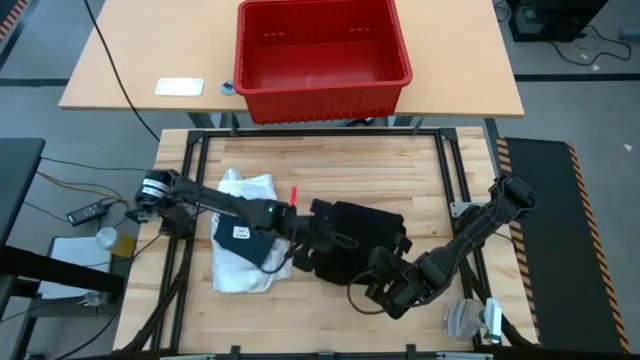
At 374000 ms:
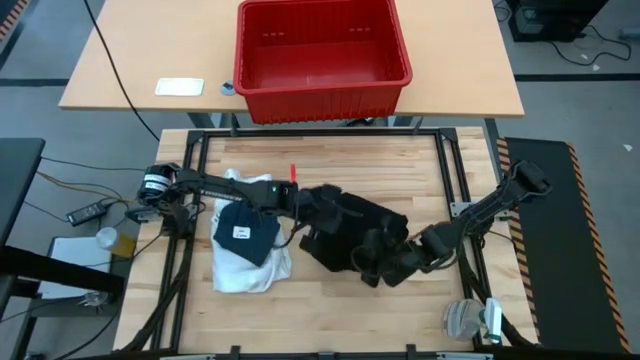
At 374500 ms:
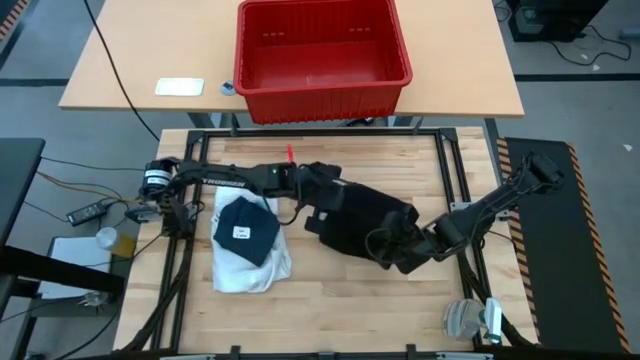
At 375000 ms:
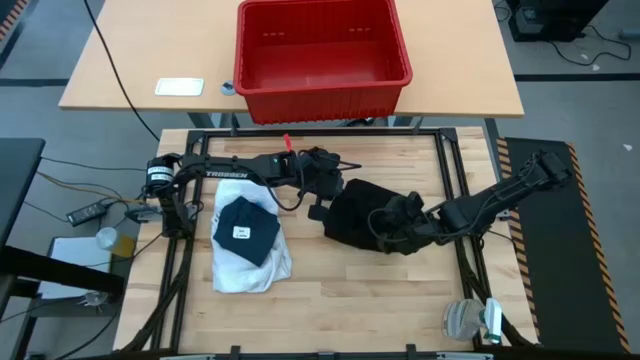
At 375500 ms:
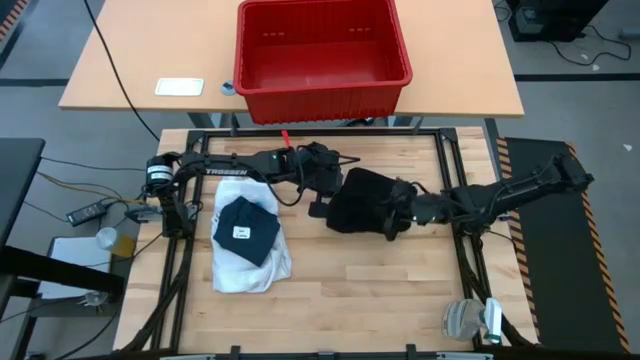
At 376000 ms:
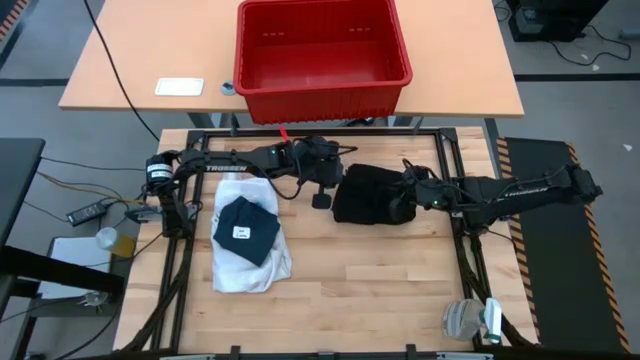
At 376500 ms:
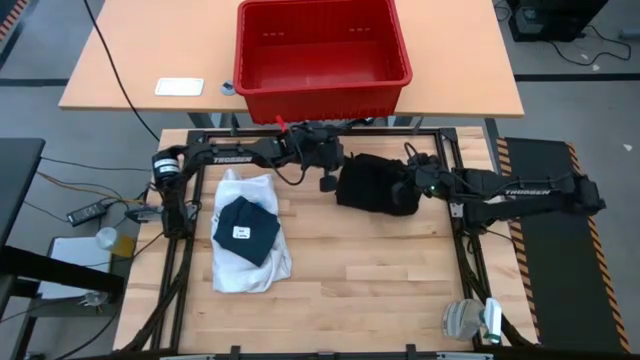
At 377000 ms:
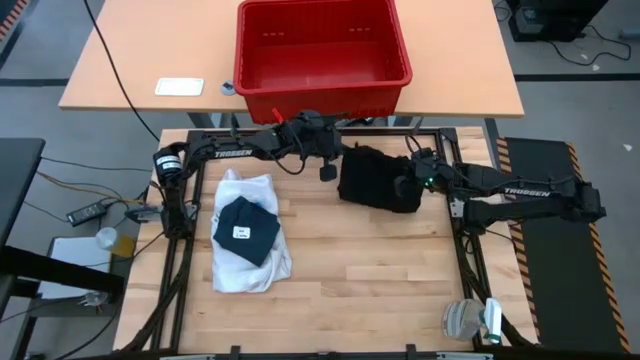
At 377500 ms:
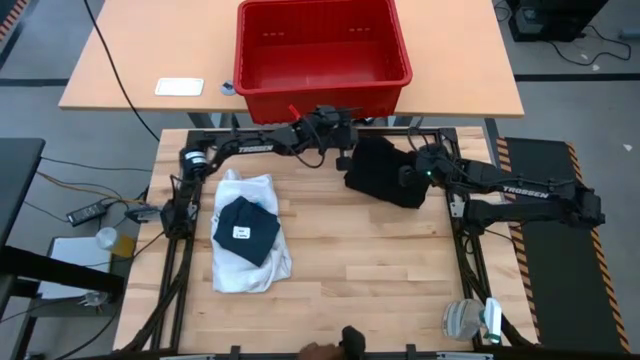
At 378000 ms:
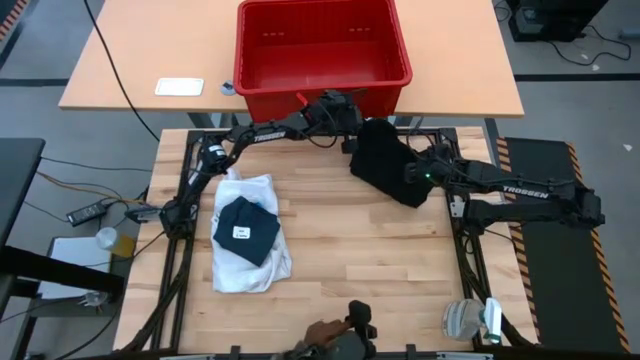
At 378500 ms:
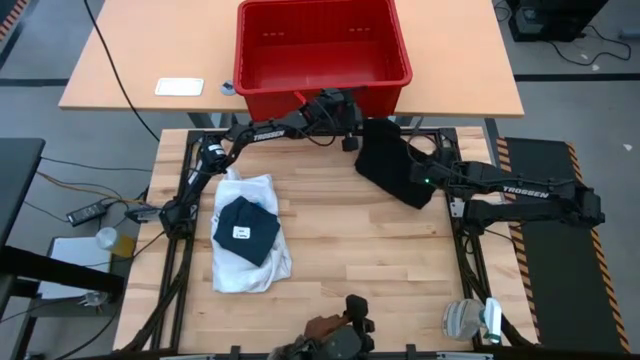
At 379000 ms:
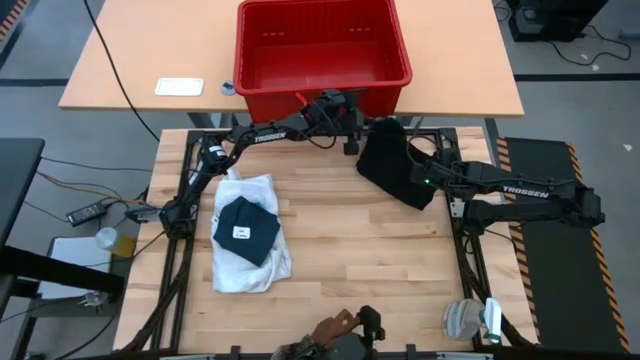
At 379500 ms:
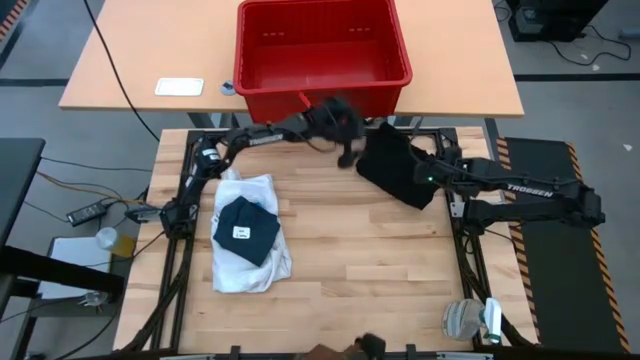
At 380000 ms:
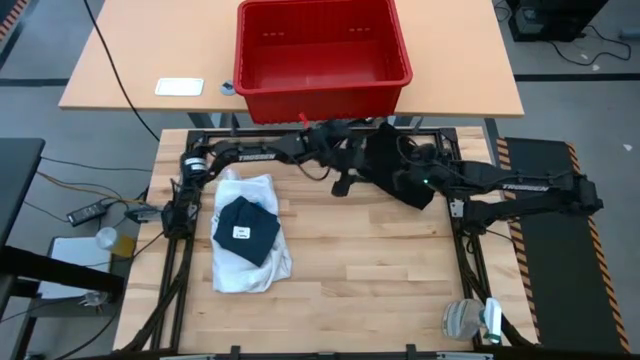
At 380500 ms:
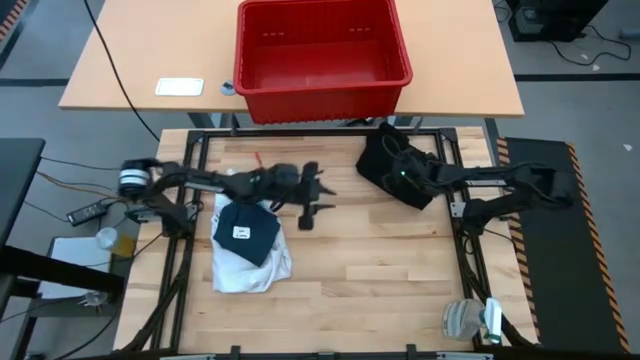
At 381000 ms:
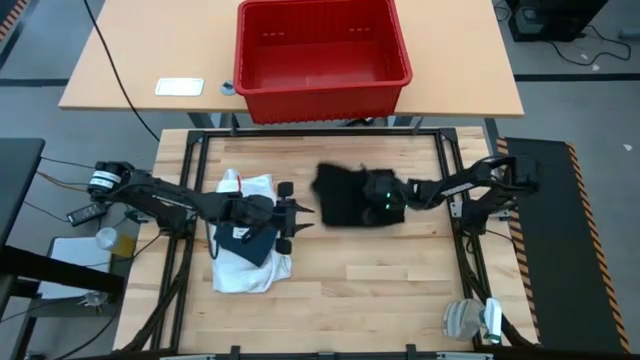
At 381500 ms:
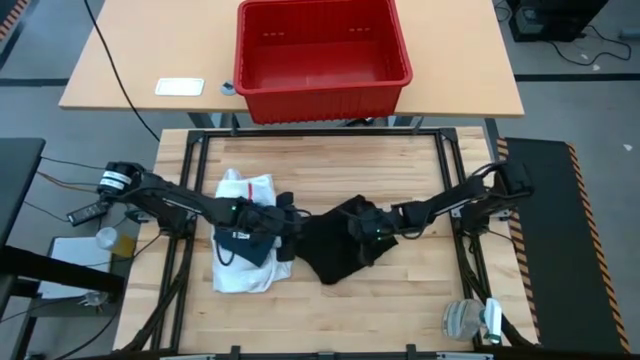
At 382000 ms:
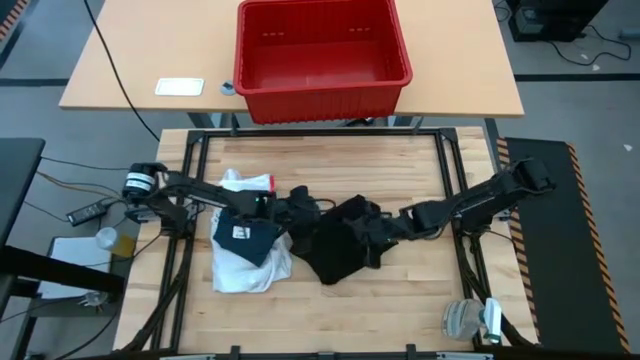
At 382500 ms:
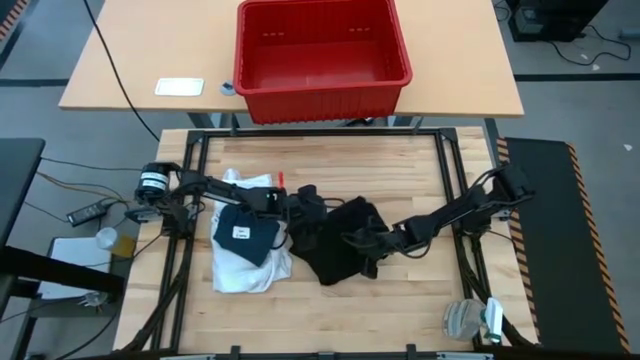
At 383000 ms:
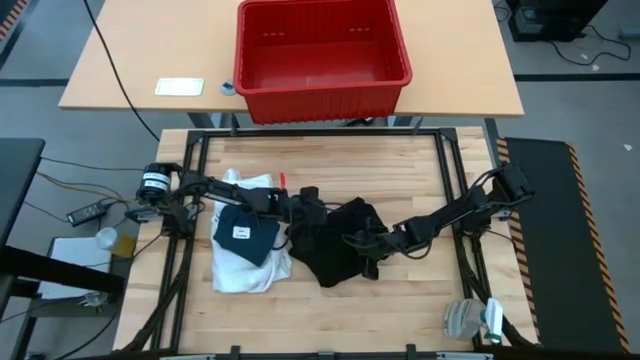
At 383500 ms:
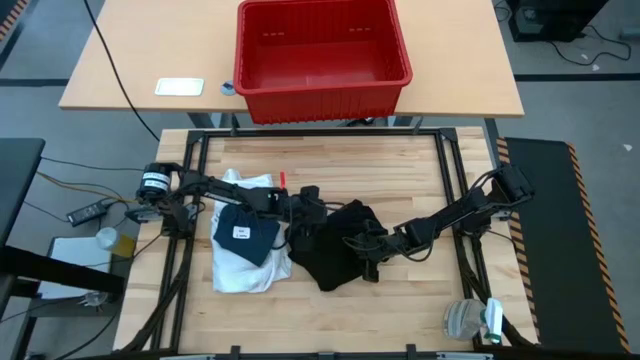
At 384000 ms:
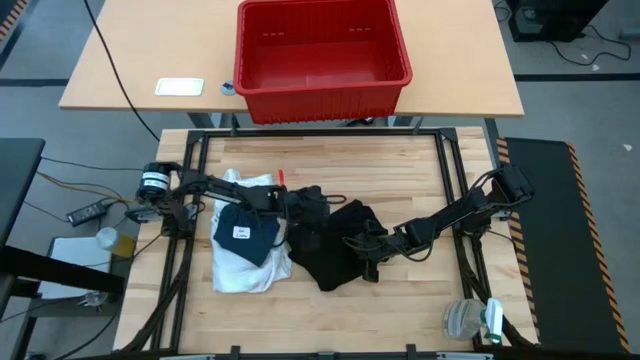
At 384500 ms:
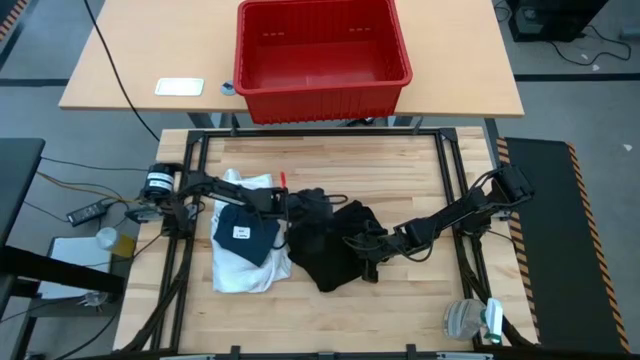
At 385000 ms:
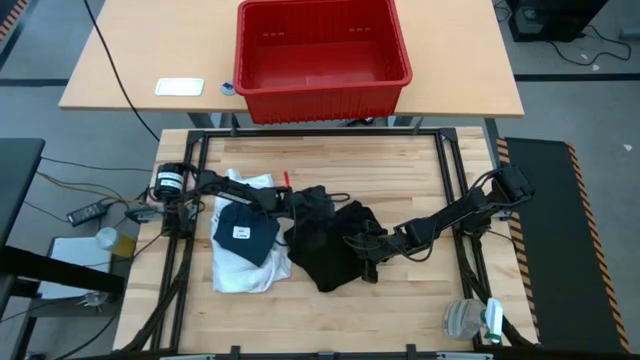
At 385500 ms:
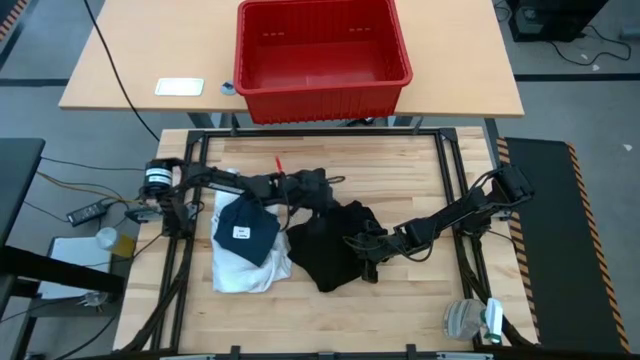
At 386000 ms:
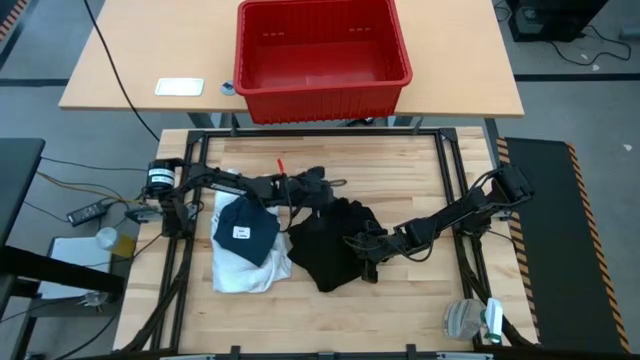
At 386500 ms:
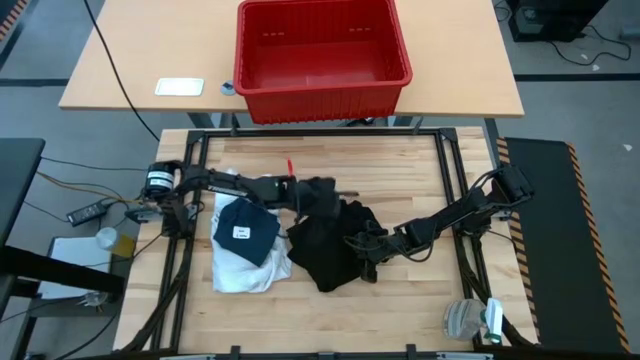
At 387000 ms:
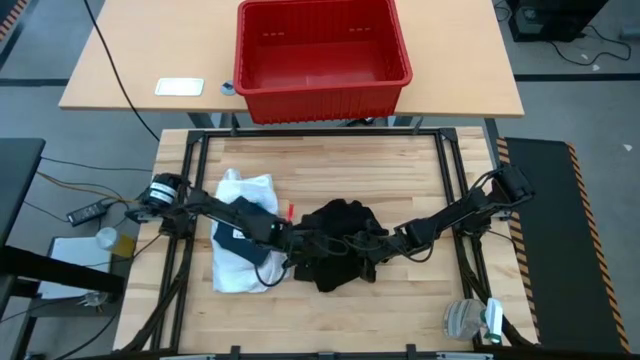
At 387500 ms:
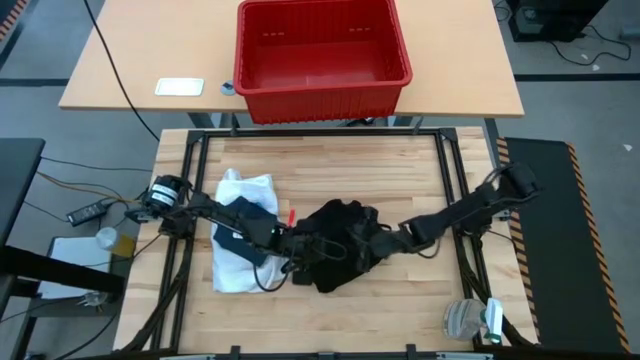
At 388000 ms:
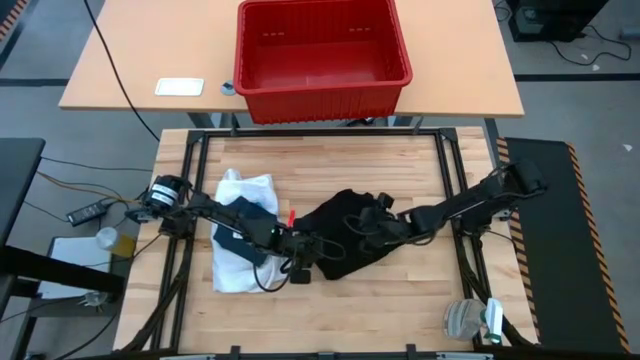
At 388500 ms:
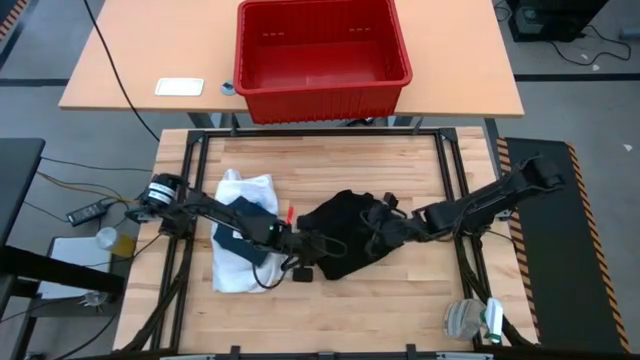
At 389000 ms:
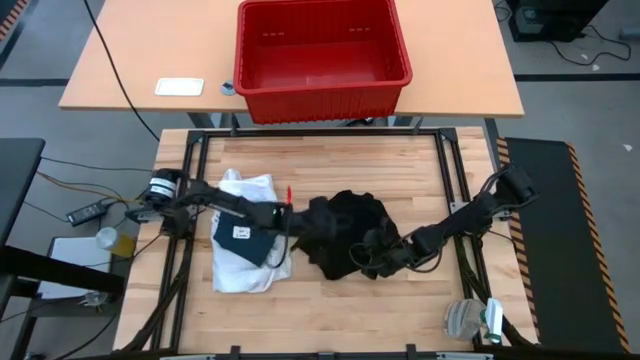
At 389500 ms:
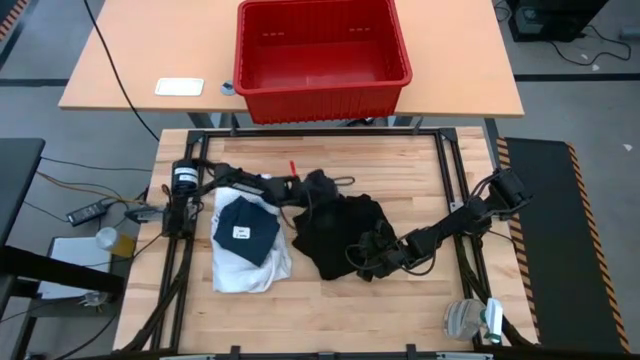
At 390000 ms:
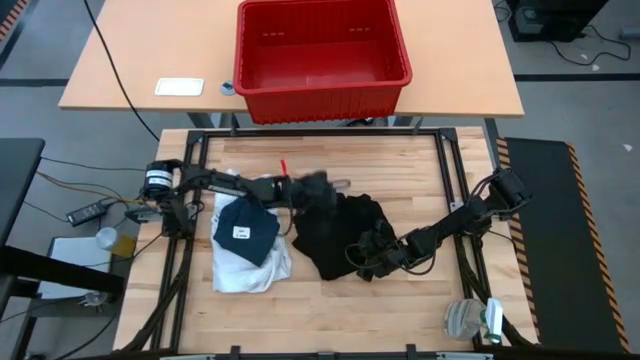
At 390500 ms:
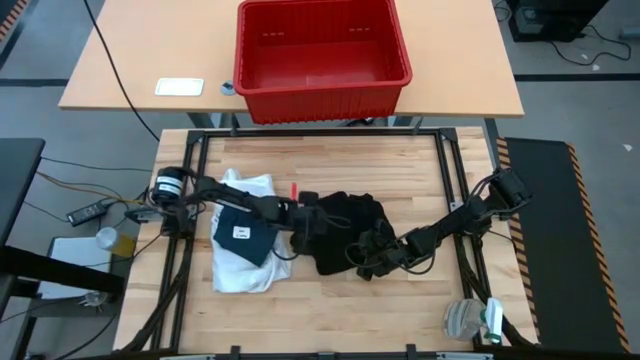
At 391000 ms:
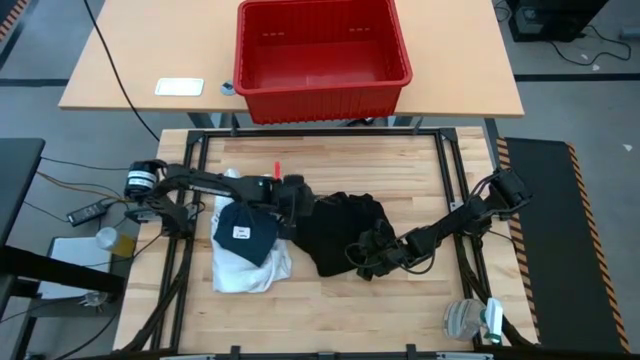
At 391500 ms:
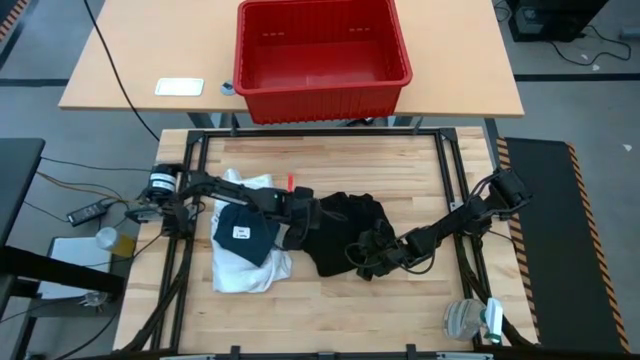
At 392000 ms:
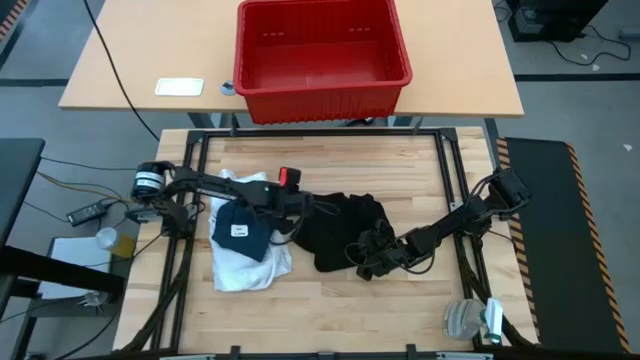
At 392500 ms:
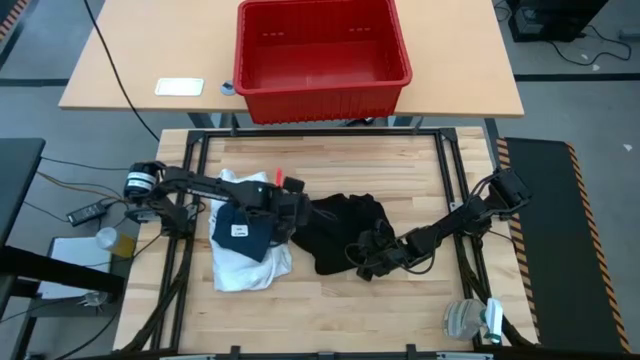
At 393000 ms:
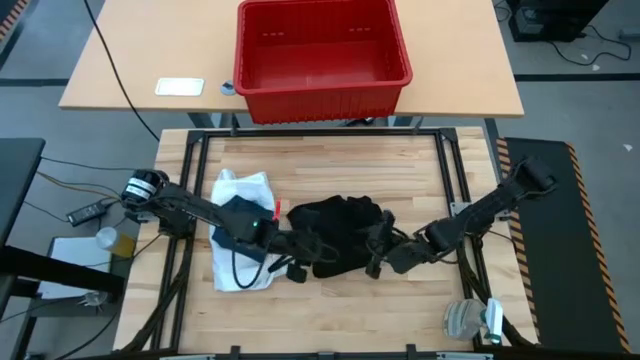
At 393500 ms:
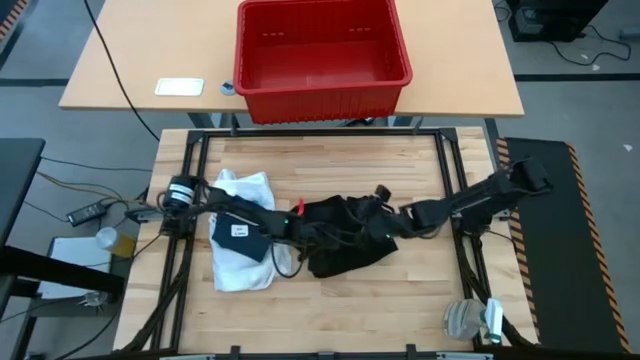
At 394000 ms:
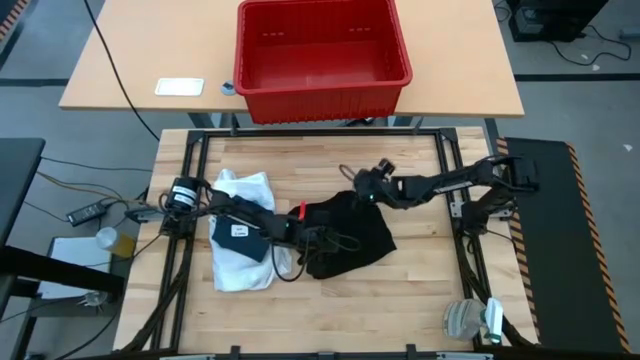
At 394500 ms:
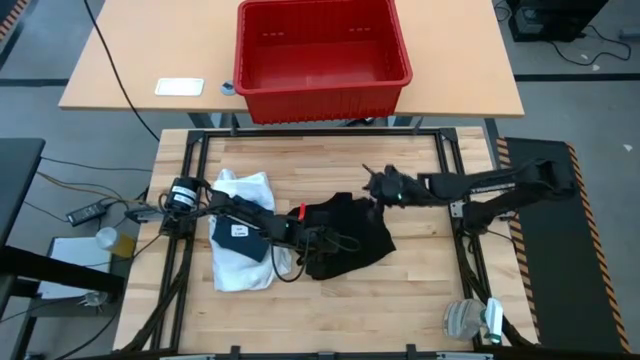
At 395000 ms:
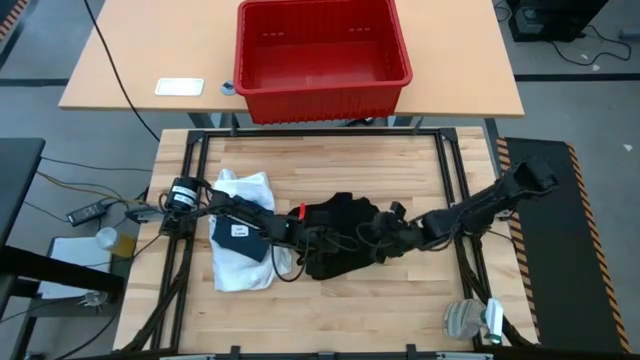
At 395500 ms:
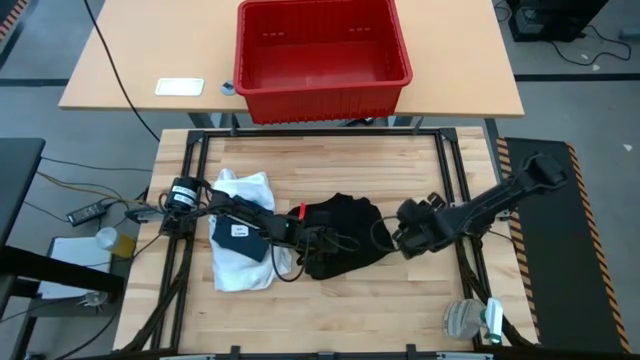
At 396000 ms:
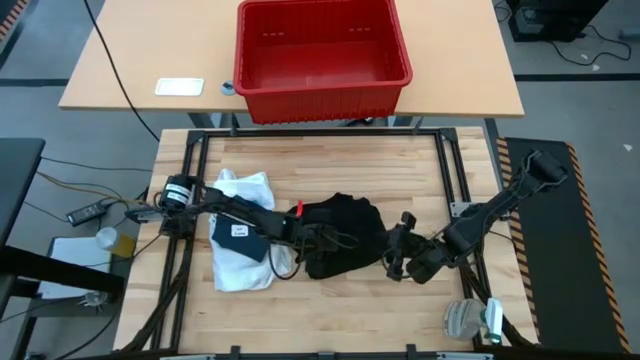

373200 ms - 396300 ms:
Task: Fold laundry
Fold the black shirt
